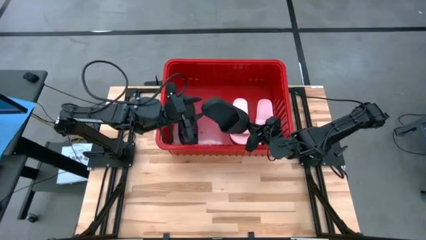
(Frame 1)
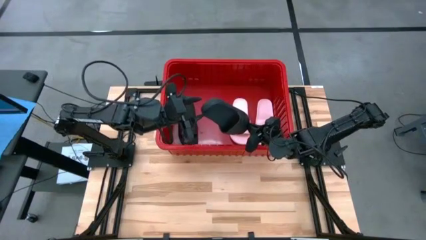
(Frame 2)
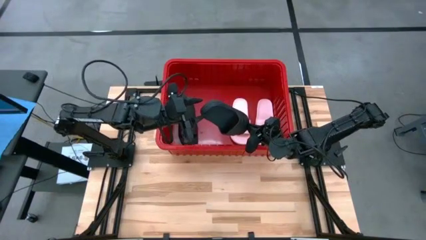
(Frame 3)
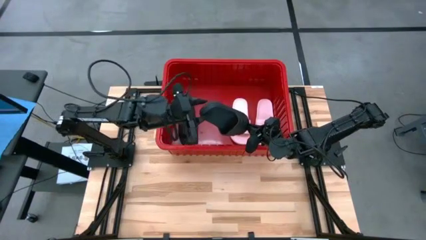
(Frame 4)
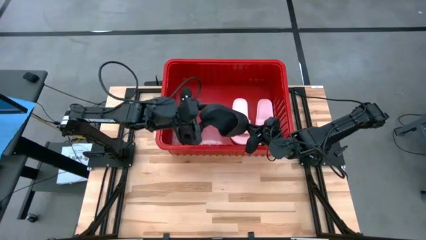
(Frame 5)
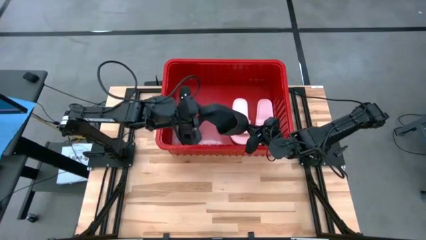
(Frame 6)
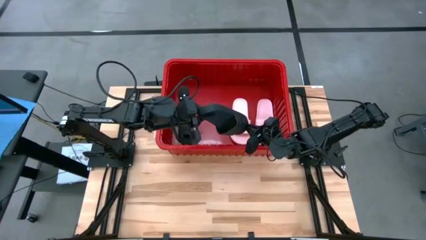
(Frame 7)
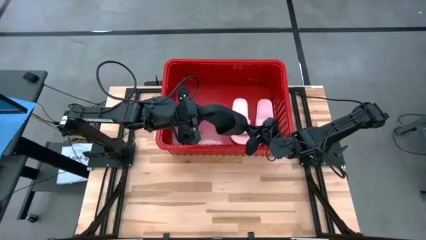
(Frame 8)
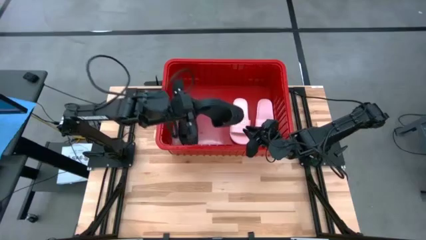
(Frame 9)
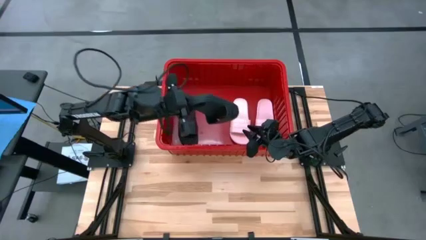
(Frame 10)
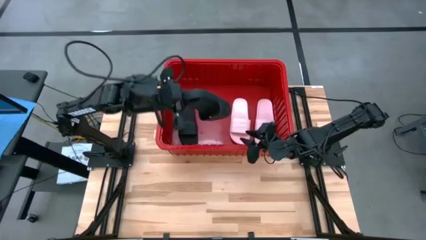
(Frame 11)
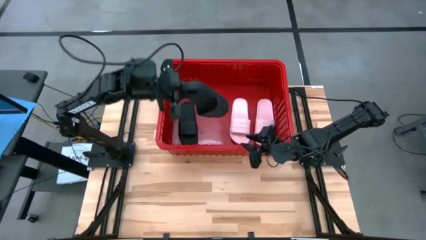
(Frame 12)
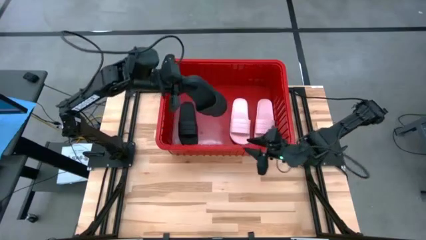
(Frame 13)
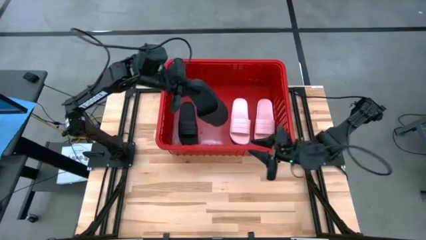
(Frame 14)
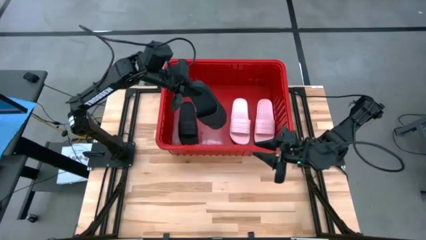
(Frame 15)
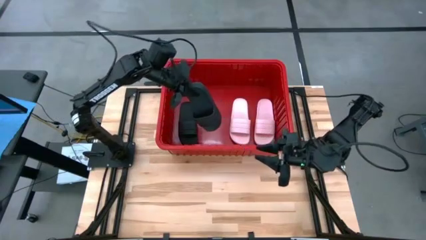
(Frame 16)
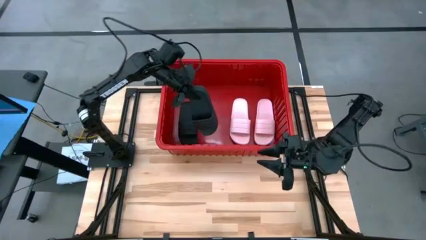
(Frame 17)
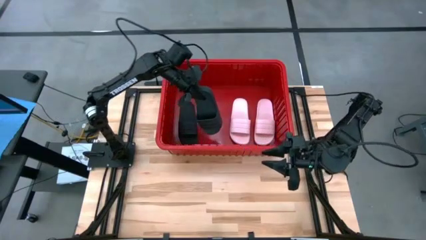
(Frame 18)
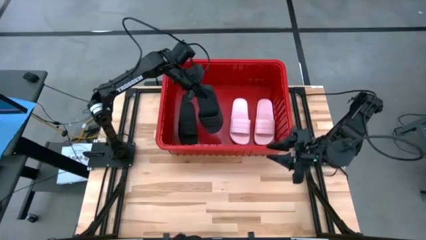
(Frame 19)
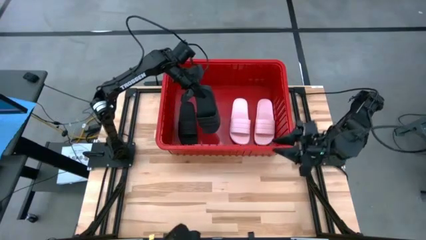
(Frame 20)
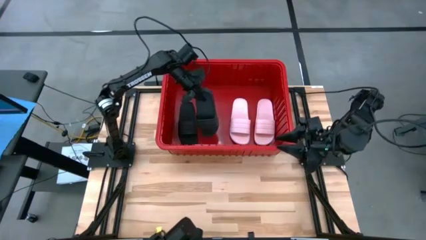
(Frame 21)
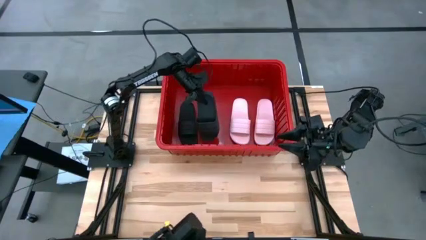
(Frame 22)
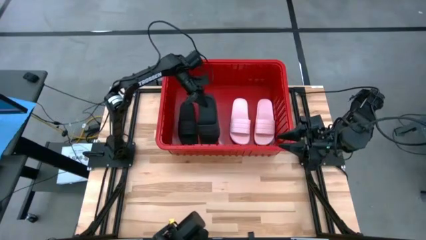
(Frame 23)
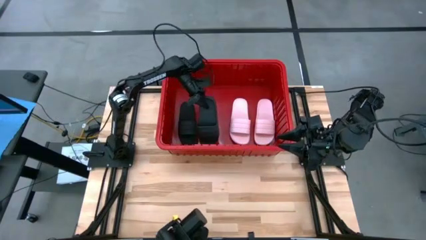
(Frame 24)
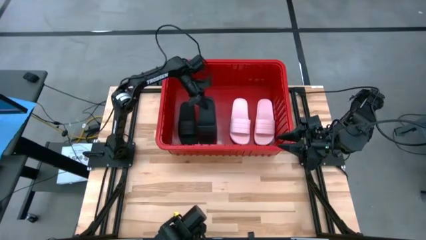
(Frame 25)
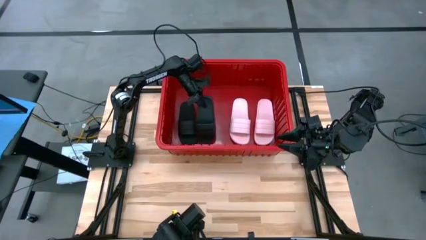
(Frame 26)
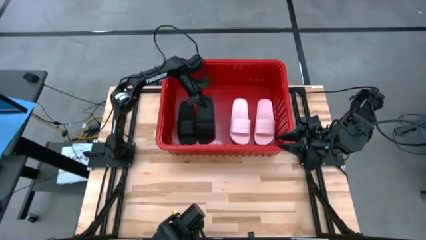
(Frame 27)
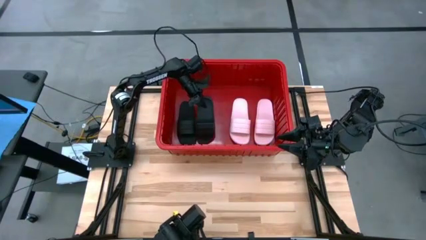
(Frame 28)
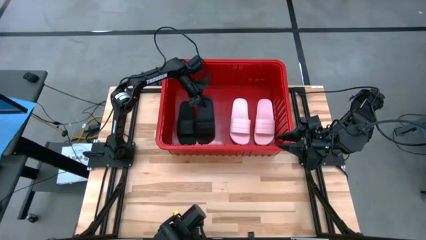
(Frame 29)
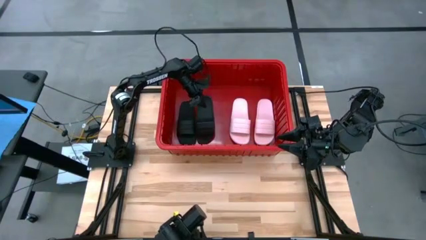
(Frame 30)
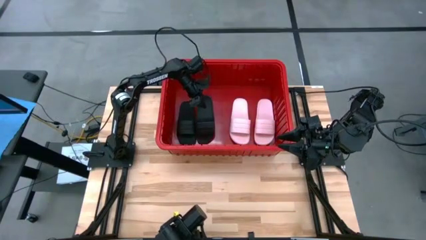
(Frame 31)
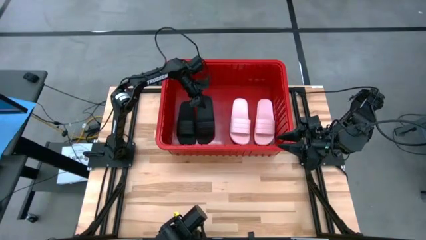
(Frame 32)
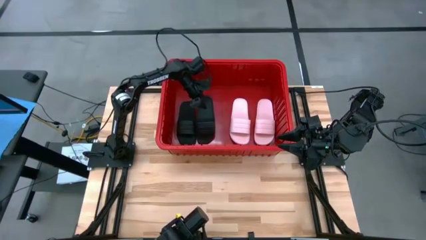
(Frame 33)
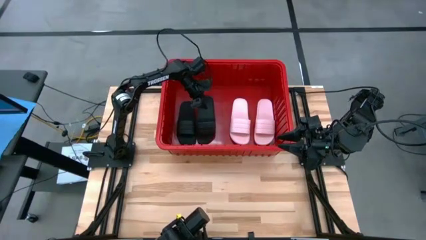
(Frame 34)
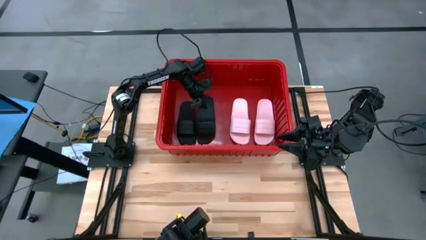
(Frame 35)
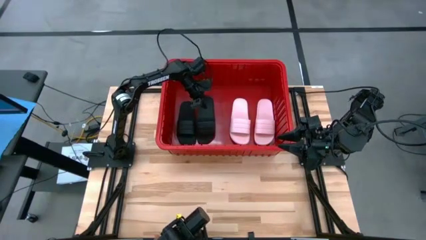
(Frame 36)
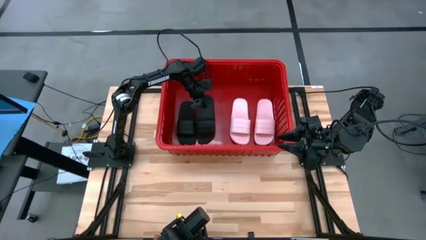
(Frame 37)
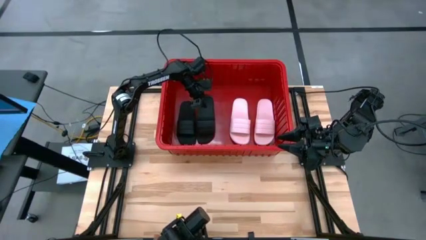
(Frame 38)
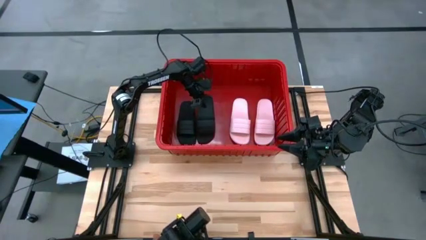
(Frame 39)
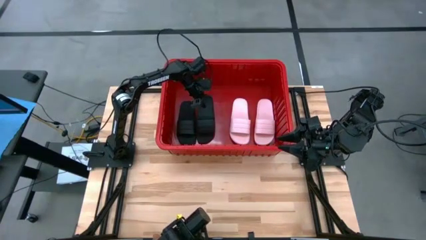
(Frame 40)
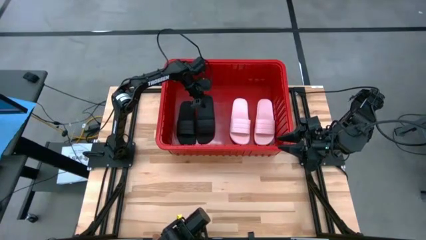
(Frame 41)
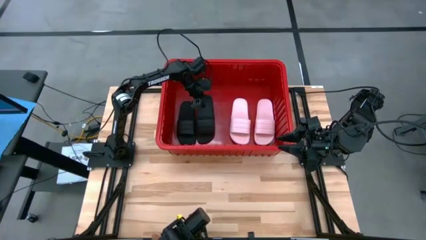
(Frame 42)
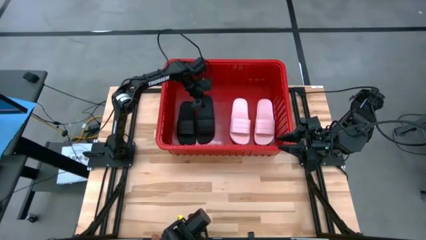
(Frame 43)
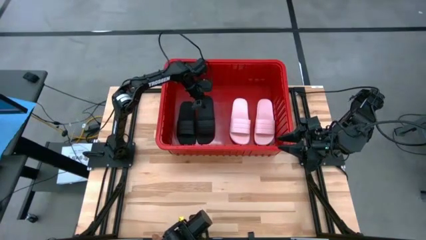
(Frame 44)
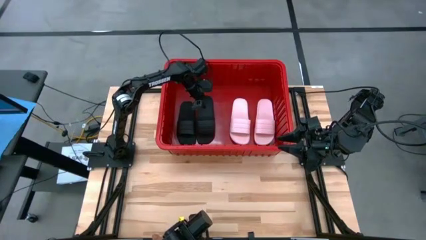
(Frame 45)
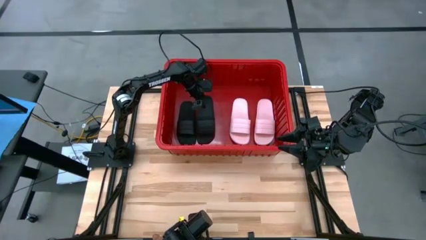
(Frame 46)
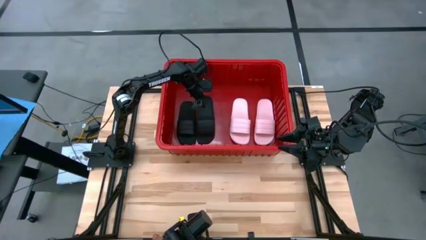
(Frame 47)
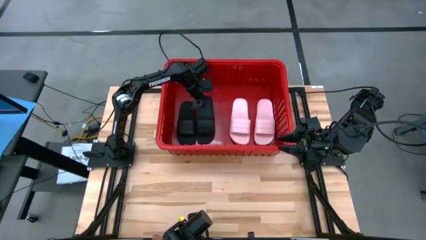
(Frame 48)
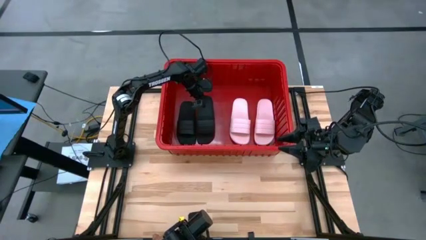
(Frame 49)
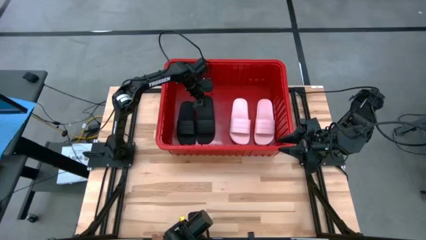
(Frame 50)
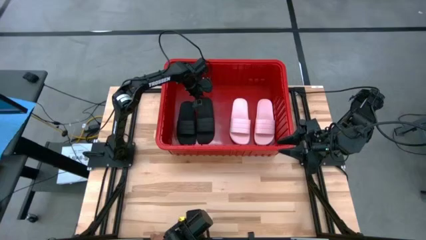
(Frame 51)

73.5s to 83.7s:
Task: Pick and place slides into bin
Put the black slide into the bin

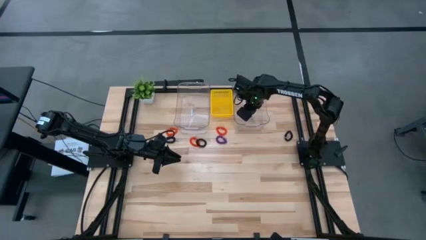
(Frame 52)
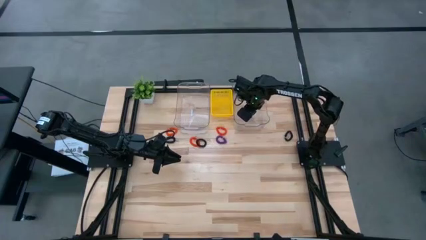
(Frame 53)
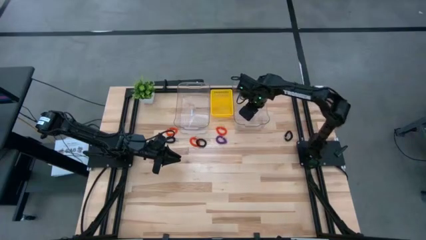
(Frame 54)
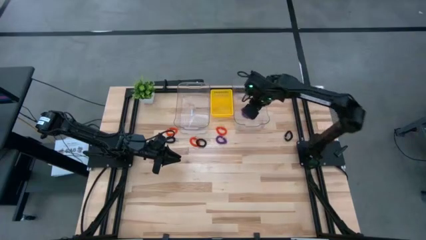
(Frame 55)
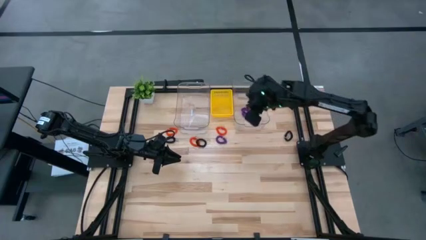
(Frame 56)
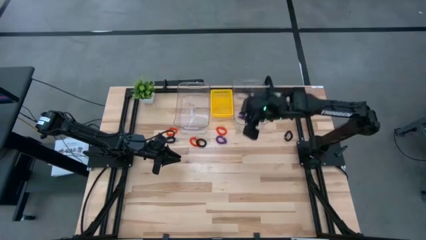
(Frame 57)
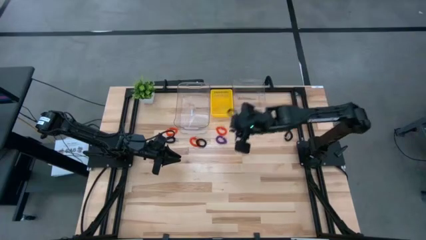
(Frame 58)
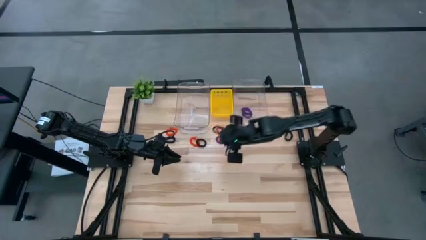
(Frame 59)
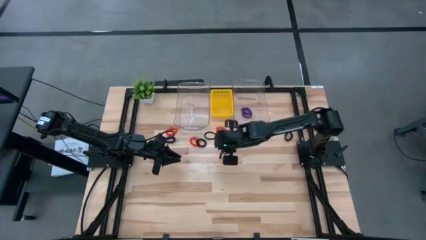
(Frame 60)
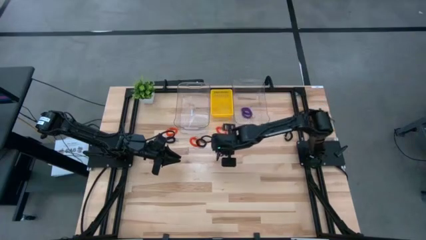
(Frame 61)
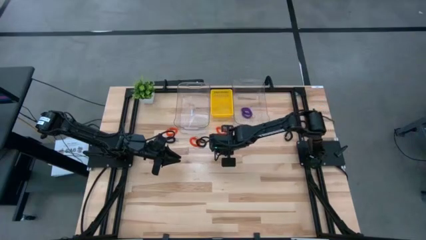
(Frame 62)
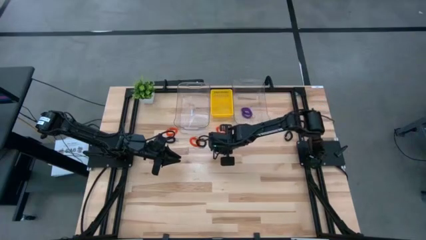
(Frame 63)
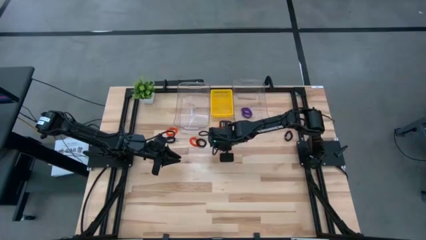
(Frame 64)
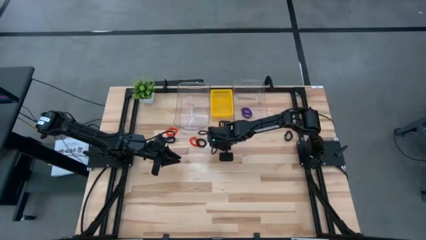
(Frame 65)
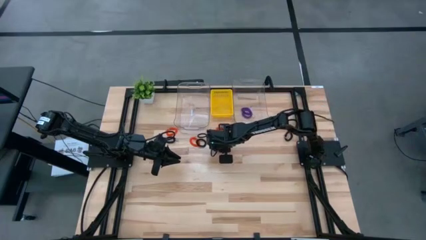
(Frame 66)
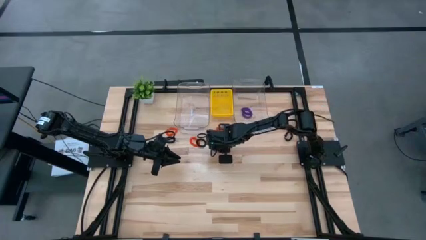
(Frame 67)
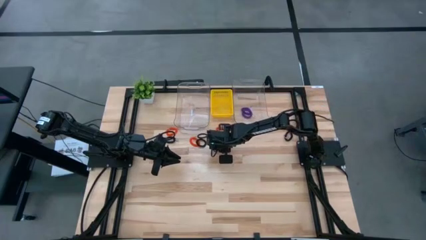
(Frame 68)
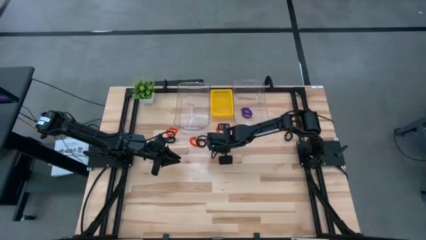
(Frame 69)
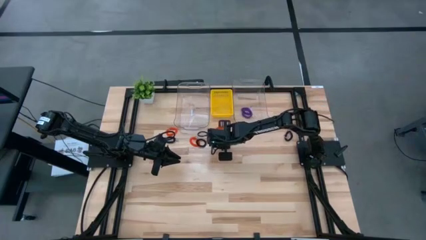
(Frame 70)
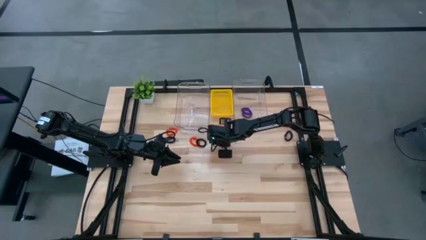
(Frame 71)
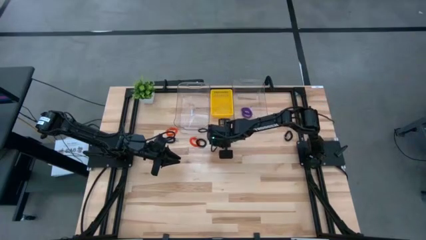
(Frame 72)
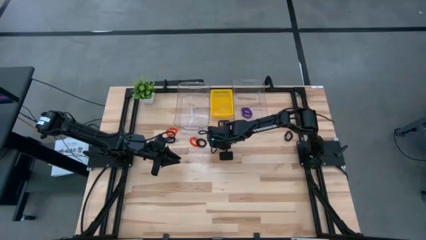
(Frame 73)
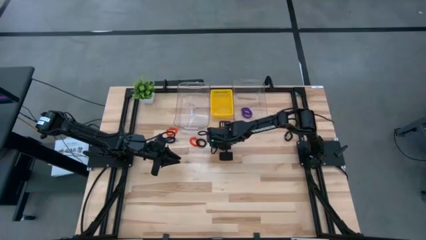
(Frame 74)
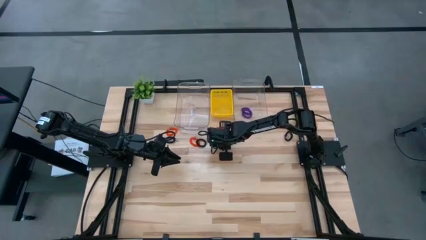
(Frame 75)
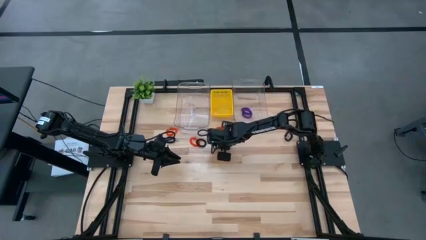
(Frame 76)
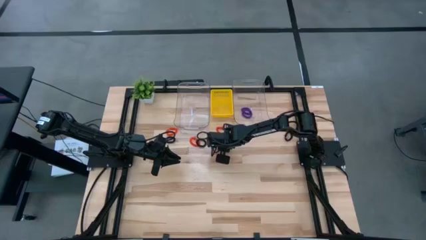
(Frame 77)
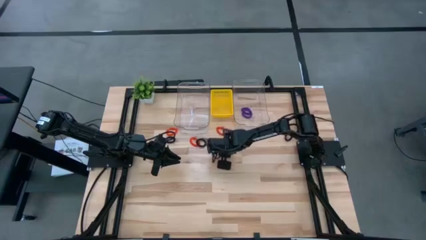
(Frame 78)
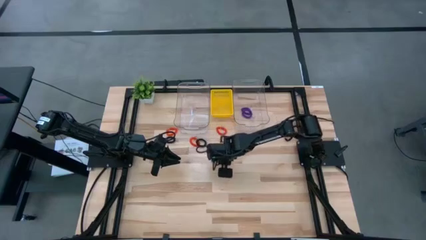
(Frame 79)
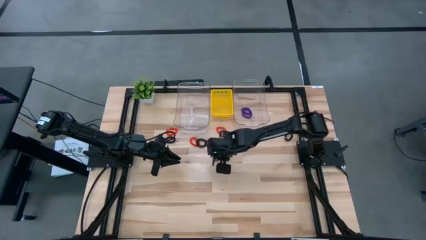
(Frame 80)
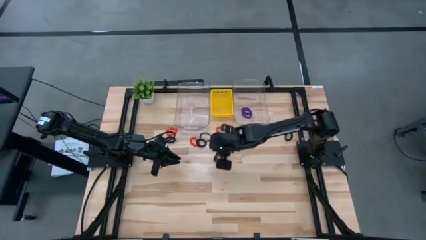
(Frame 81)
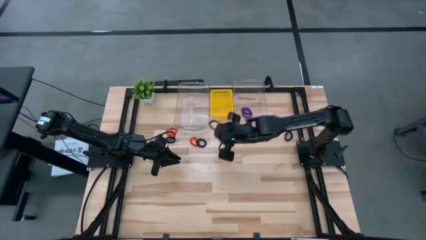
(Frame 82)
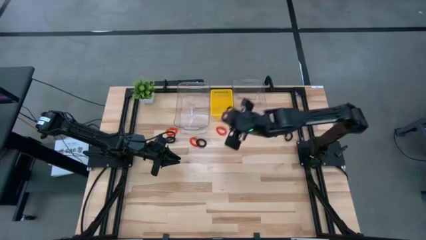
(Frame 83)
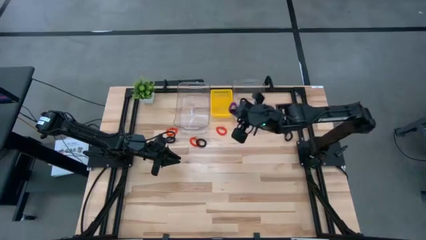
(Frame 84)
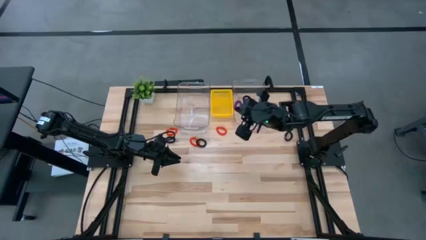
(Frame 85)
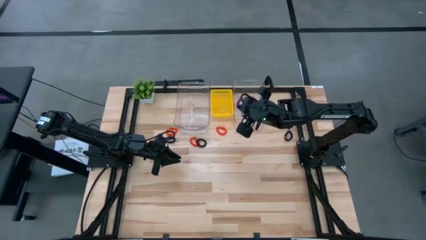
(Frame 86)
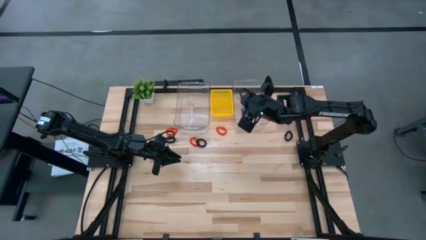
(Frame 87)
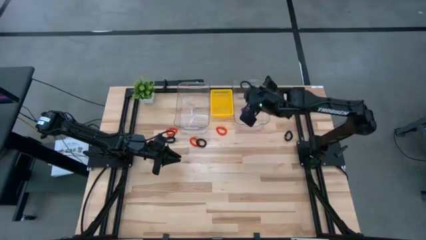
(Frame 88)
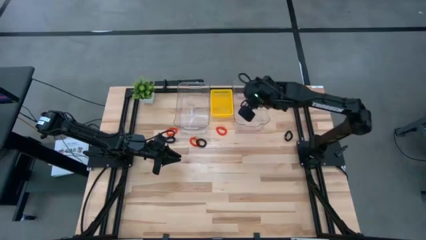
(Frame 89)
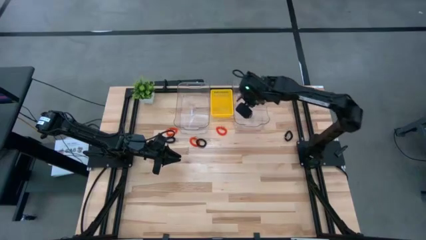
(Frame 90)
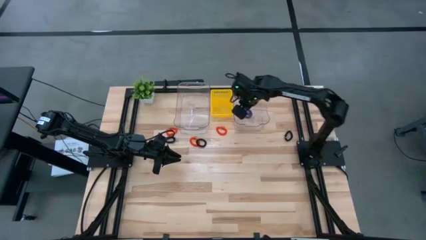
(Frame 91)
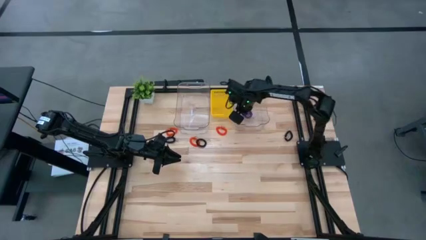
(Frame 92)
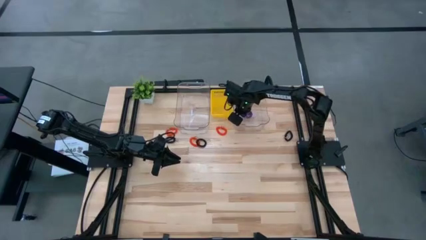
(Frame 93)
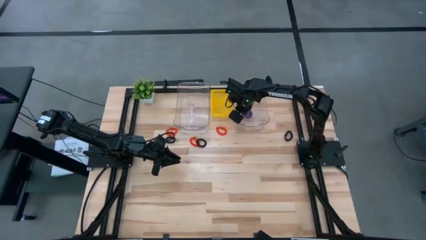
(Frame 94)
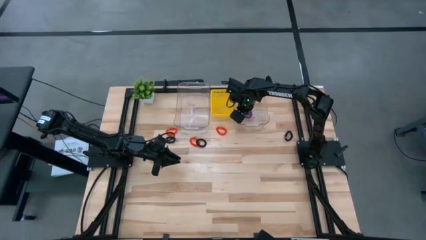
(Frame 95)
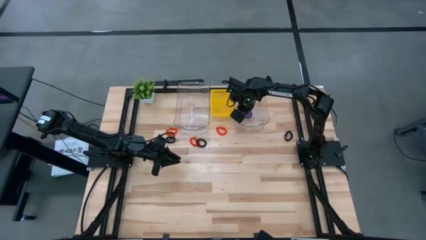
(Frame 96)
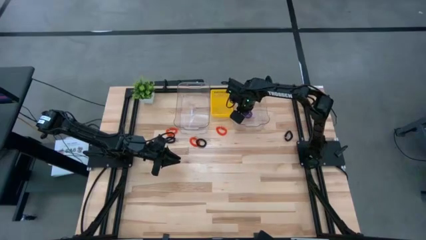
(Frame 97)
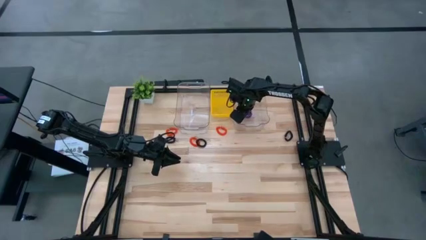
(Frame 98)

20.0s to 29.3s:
Task: Sort spring keychains
Put the purple spring keychain into the right transparent bin
